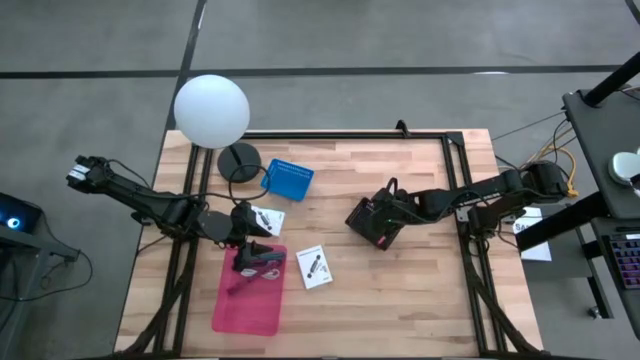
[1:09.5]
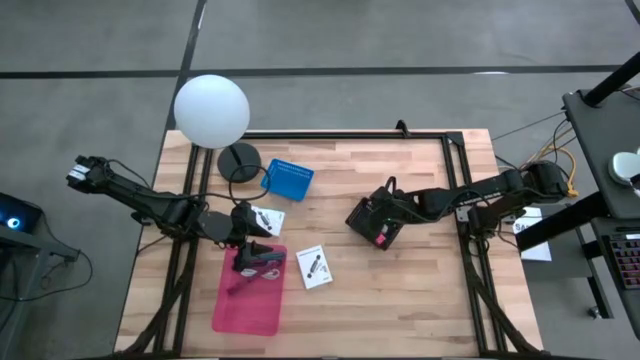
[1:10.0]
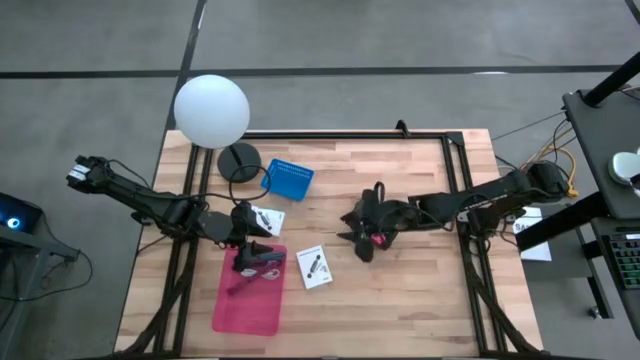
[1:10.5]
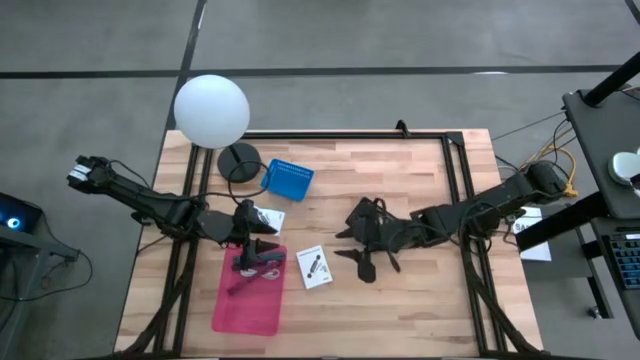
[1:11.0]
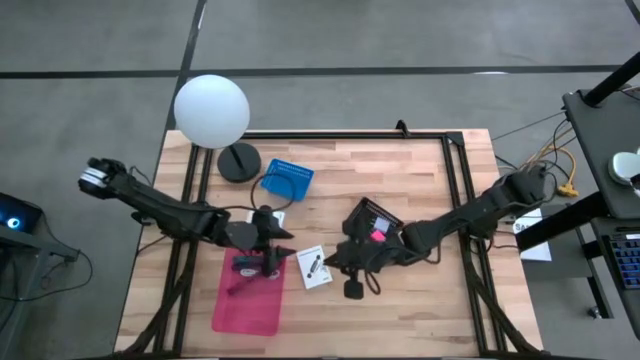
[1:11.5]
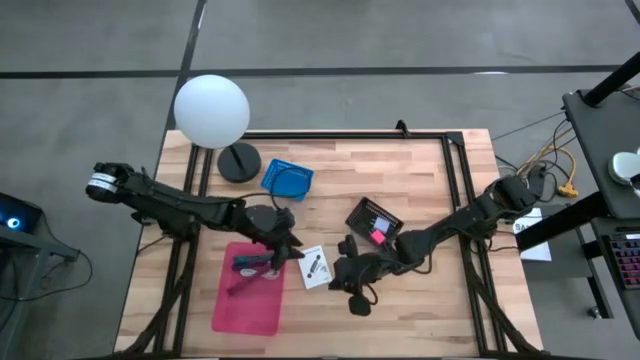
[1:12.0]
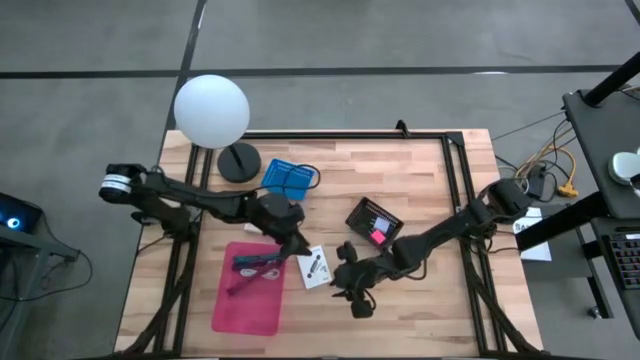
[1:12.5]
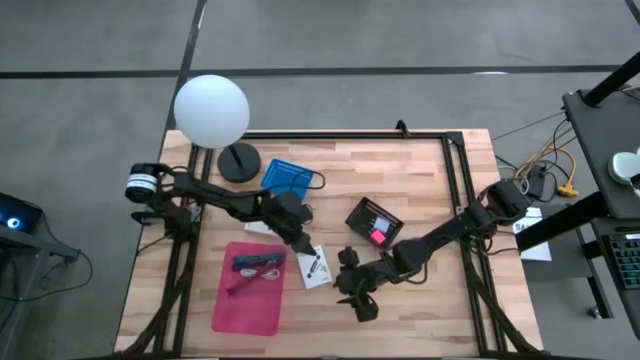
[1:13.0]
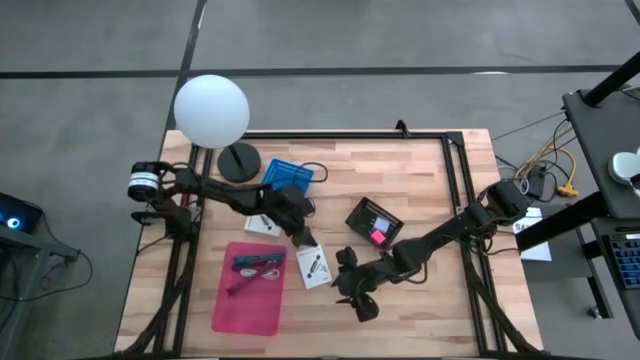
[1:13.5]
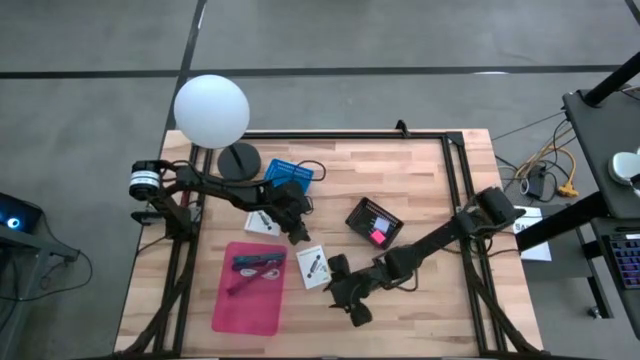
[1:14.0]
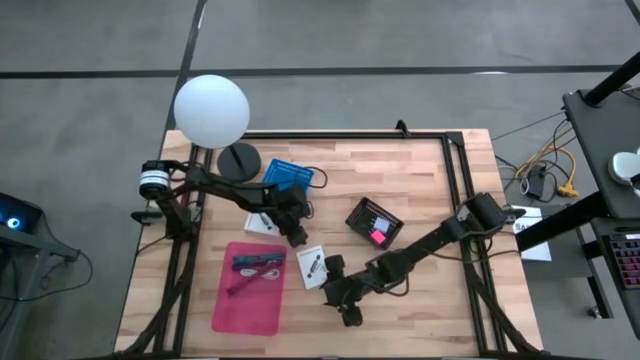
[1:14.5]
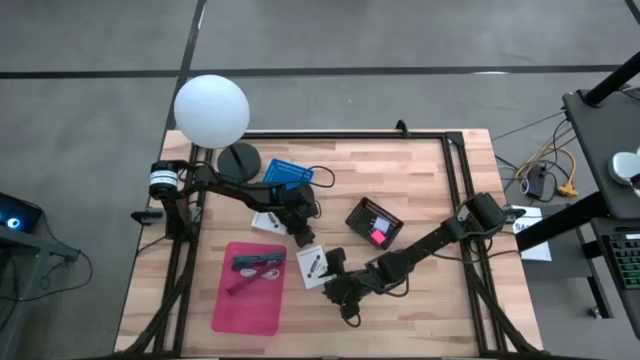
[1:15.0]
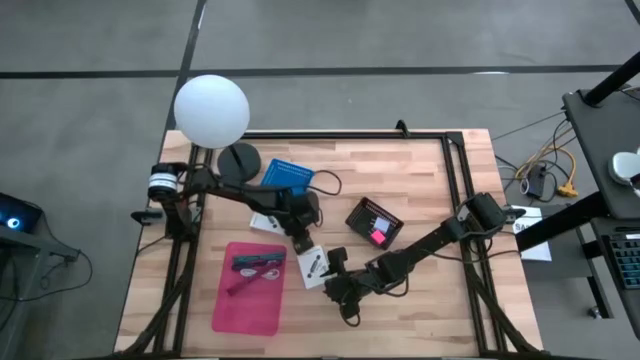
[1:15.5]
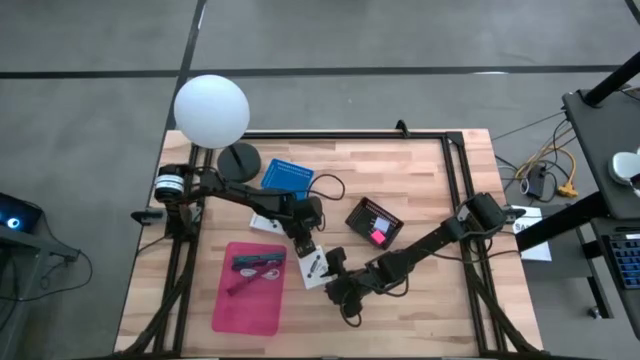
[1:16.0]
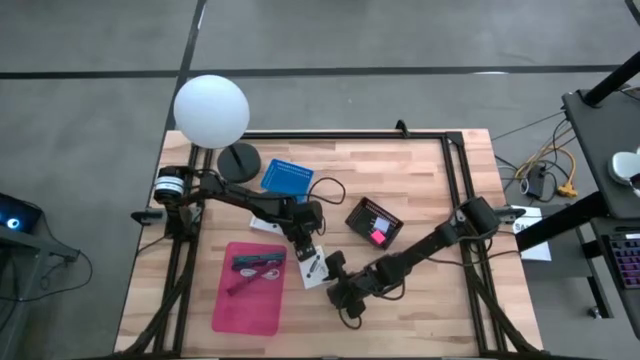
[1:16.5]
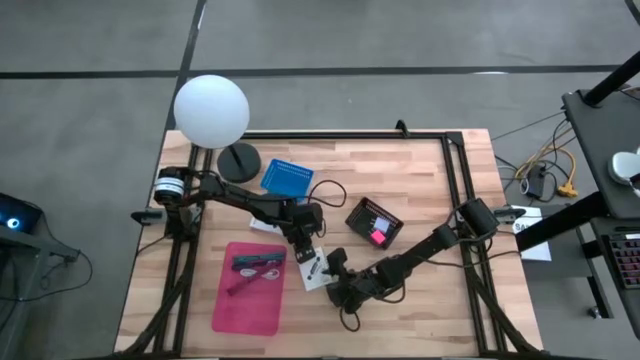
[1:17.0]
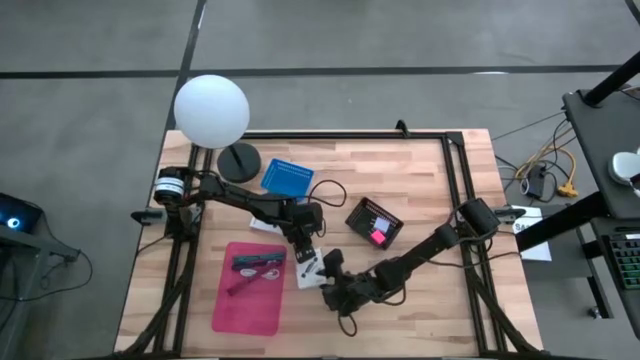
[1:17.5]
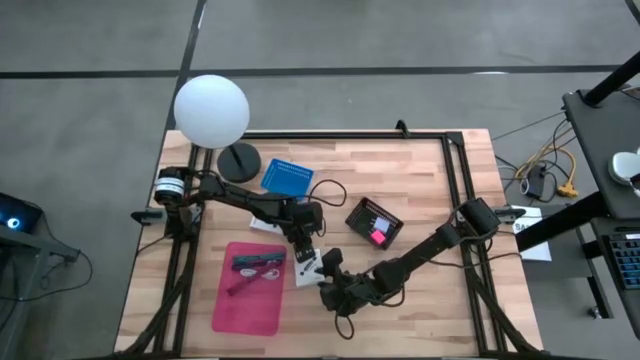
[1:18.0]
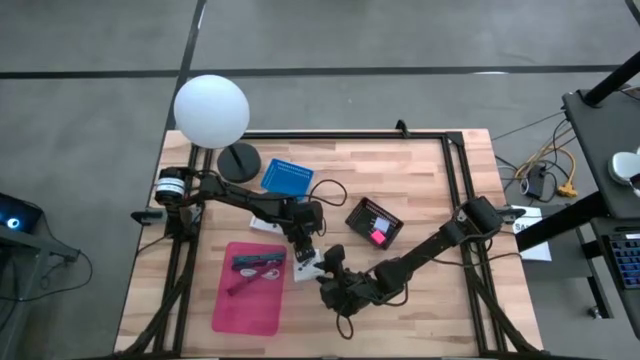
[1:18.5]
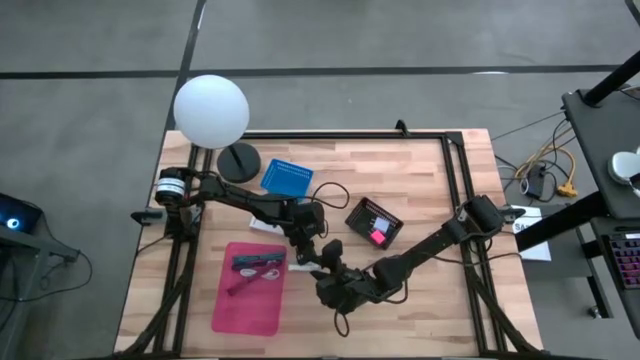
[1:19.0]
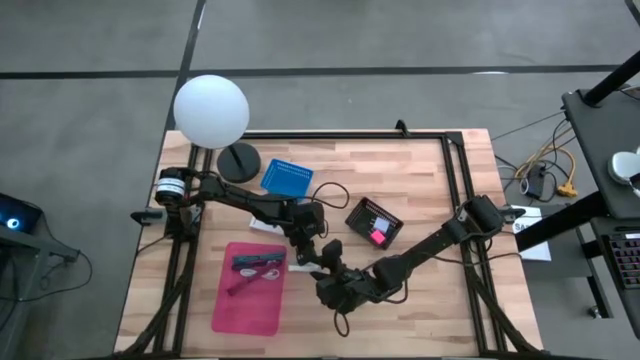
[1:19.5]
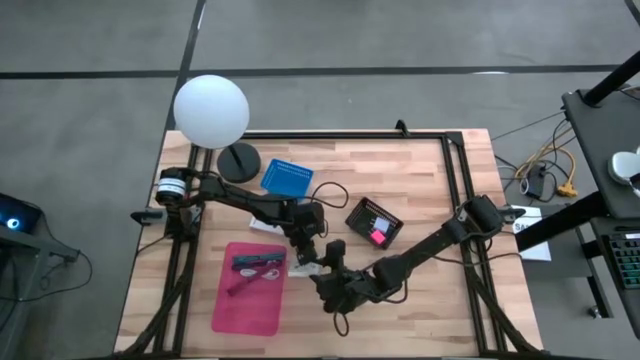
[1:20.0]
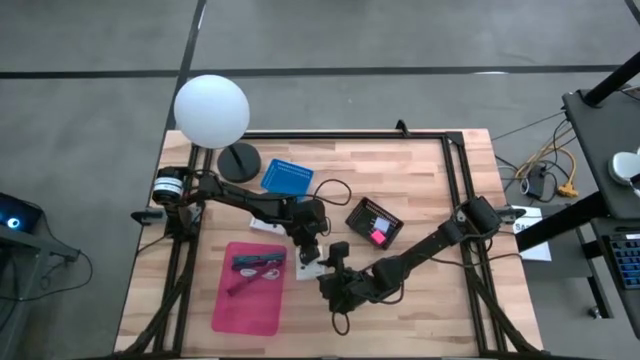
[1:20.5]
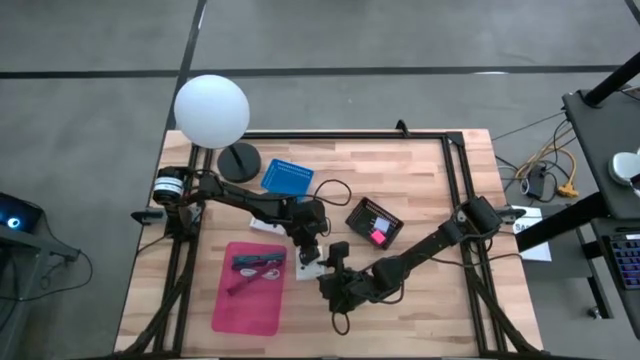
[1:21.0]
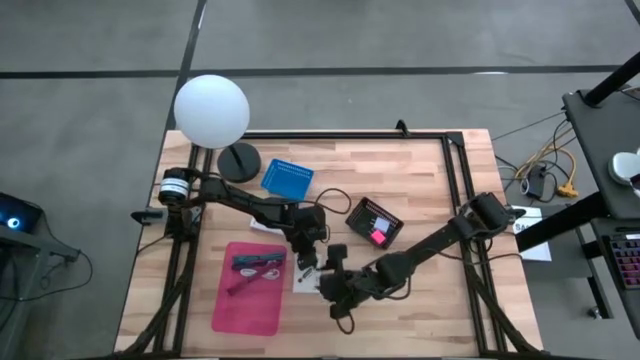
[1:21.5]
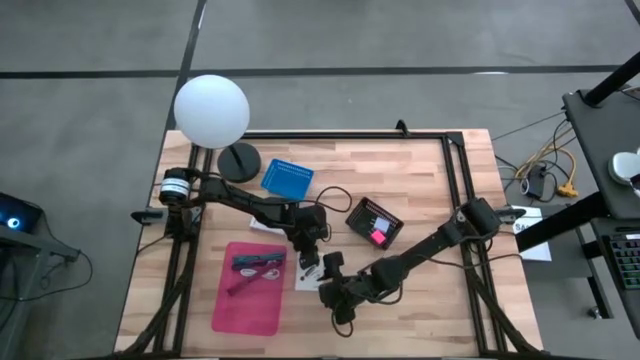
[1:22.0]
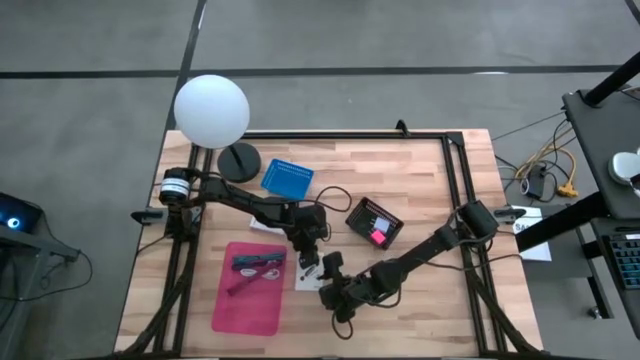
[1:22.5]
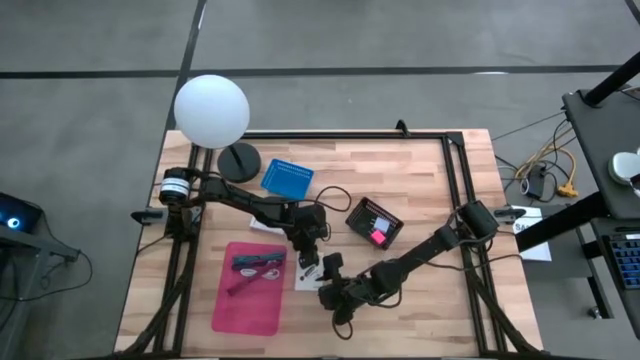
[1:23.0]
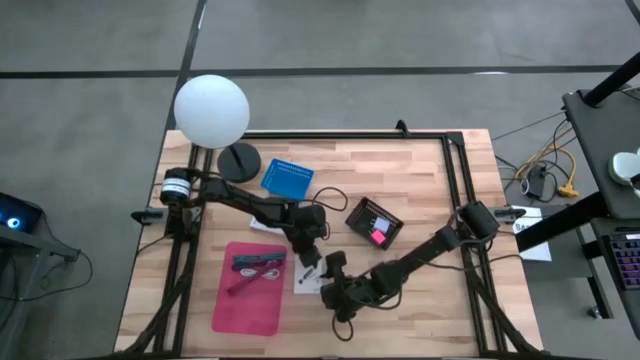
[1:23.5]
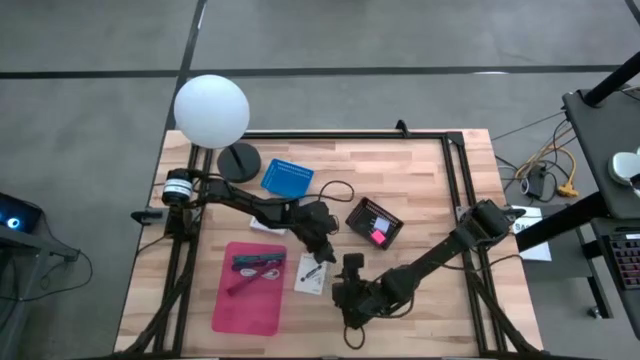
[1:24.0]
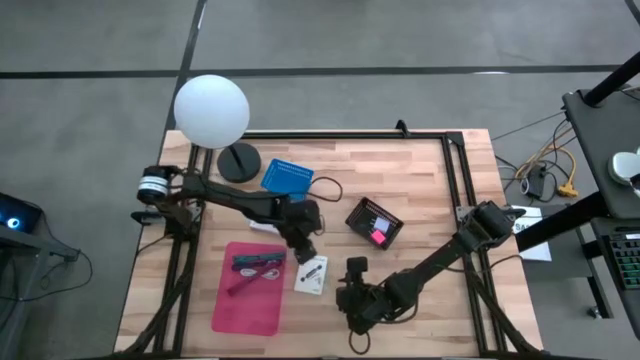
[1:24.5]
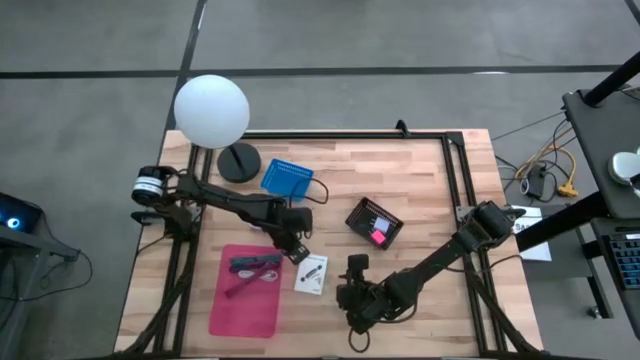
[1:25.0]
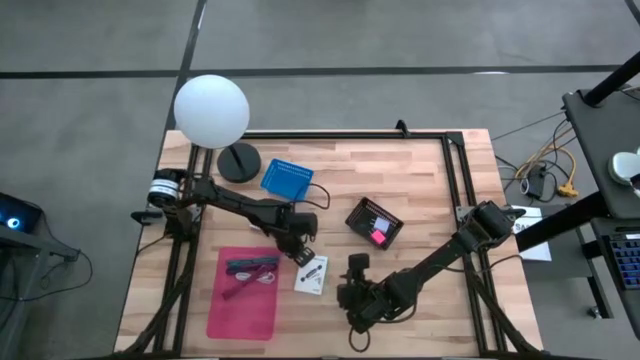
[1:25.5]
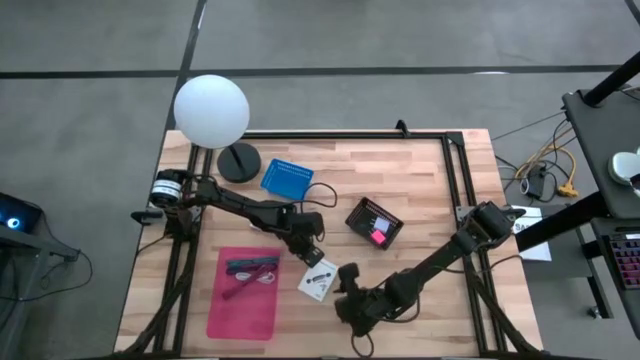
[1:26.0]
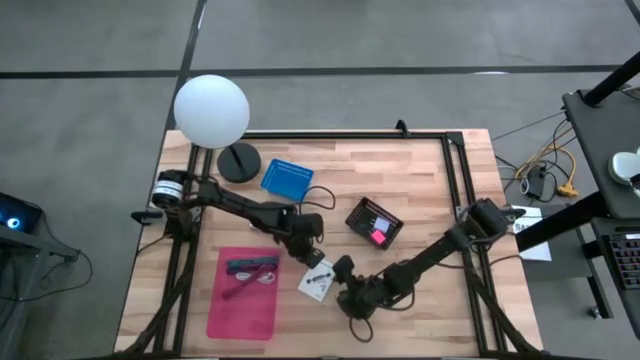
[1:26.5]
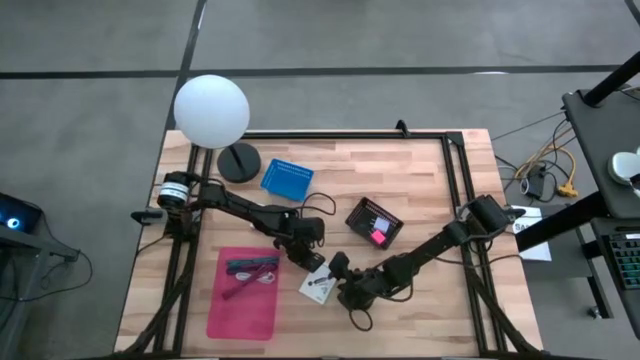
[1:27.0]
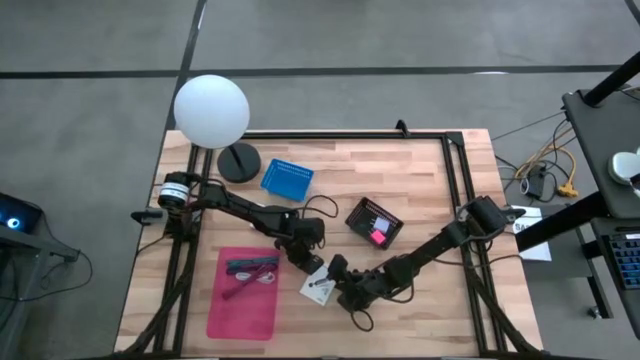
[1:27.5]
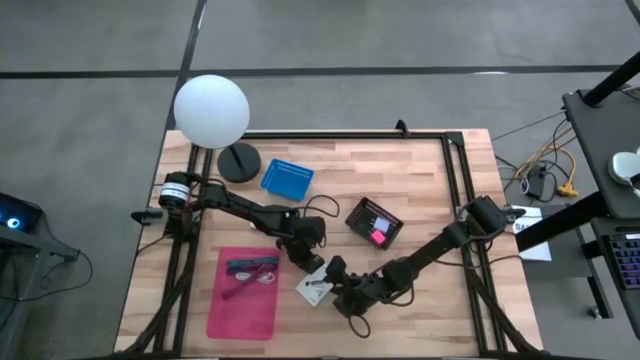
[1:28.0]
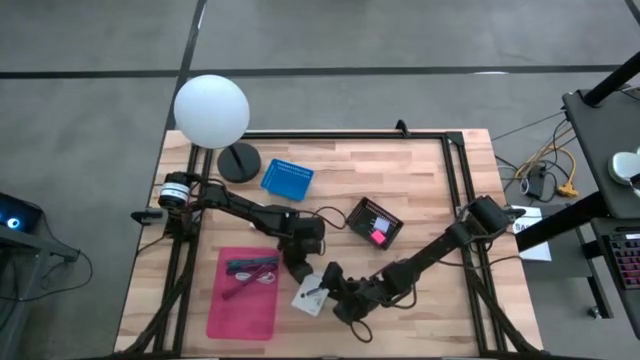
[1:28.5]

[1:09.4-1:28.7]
Task: Pick and place items into bin
Put the bottom white card reader box into the blue bin
